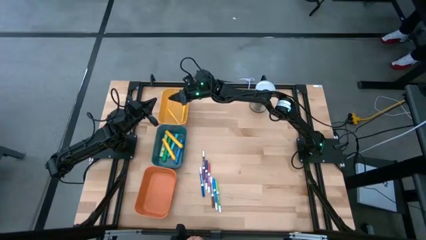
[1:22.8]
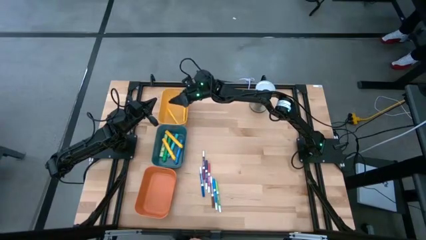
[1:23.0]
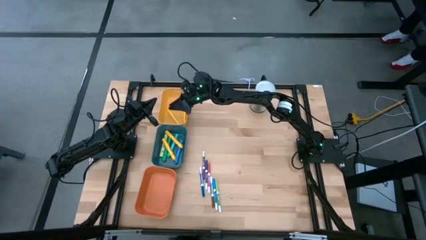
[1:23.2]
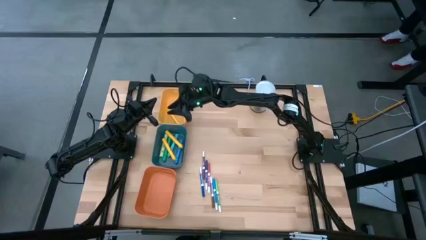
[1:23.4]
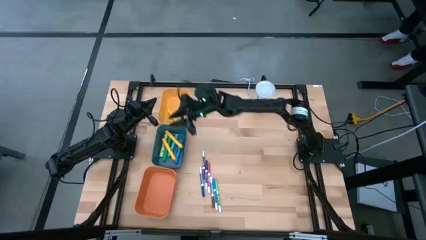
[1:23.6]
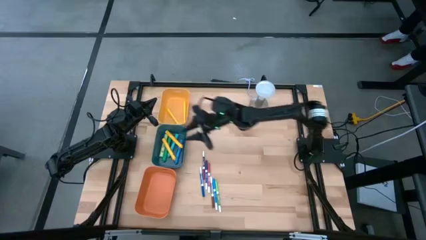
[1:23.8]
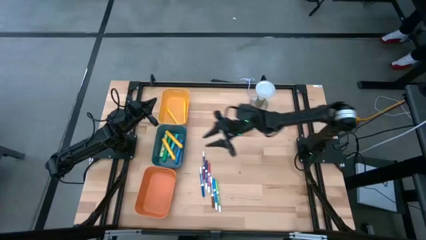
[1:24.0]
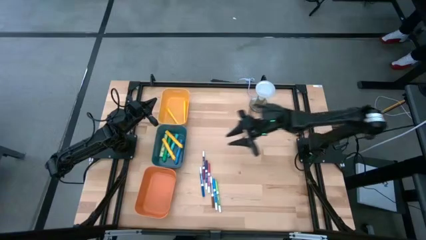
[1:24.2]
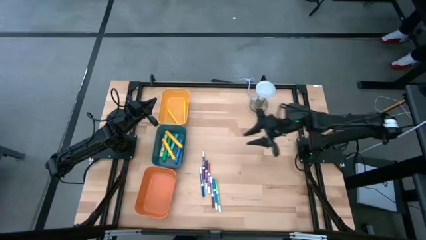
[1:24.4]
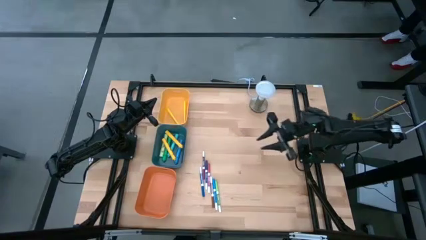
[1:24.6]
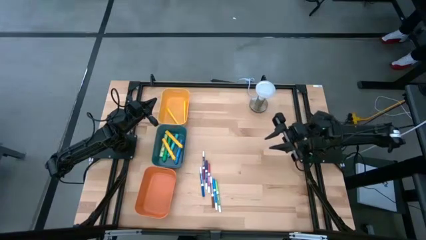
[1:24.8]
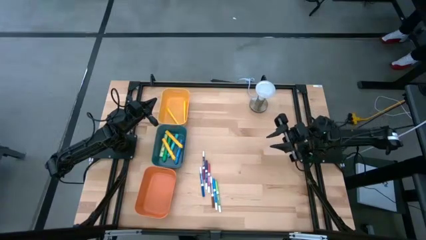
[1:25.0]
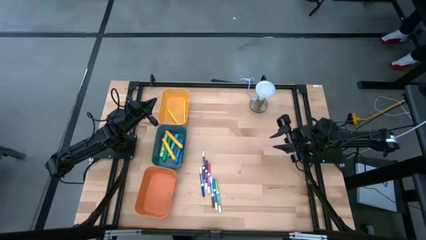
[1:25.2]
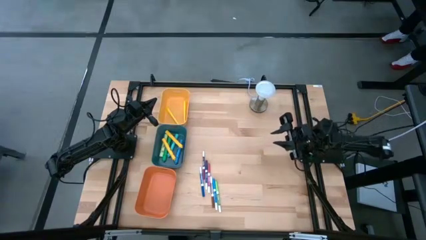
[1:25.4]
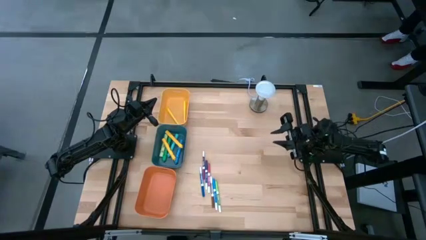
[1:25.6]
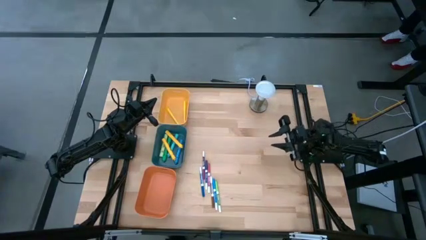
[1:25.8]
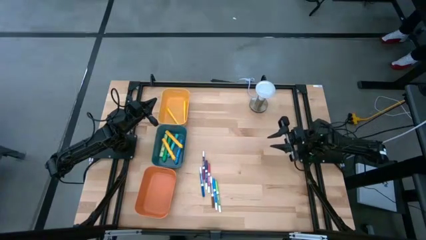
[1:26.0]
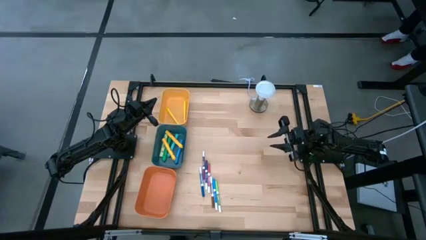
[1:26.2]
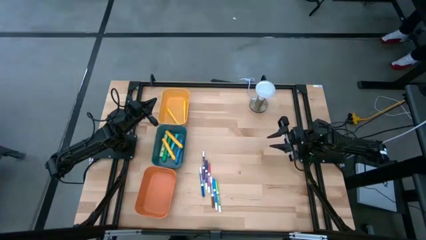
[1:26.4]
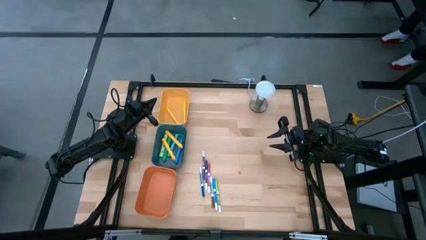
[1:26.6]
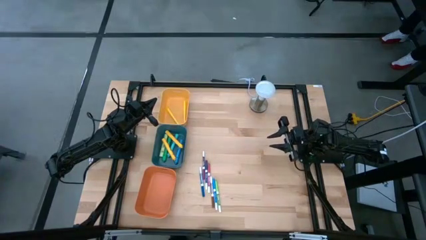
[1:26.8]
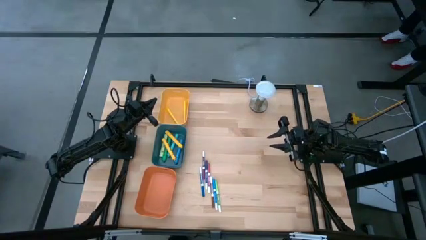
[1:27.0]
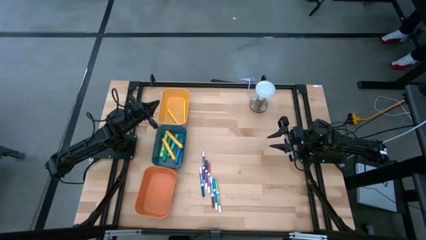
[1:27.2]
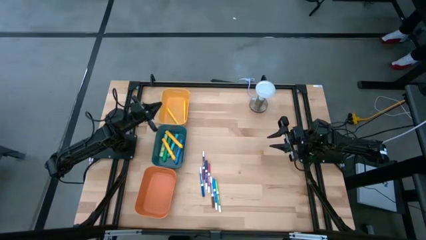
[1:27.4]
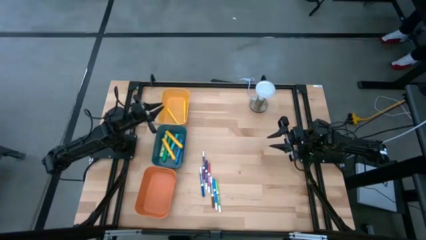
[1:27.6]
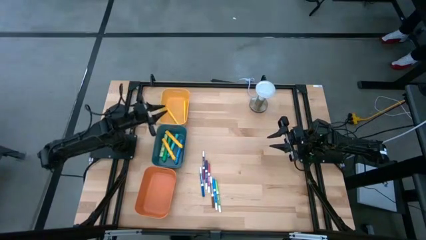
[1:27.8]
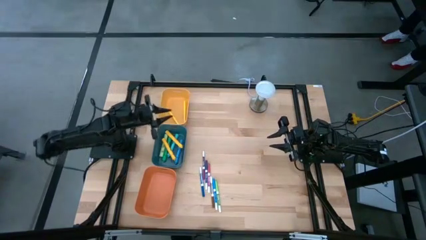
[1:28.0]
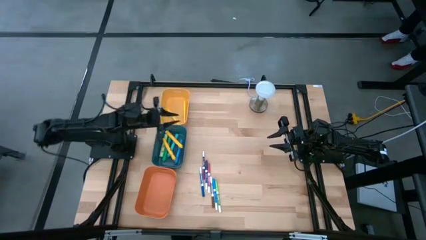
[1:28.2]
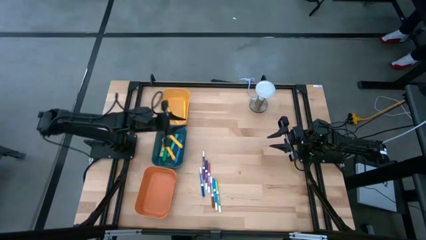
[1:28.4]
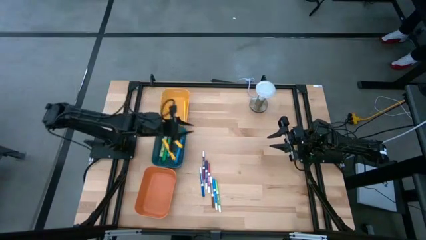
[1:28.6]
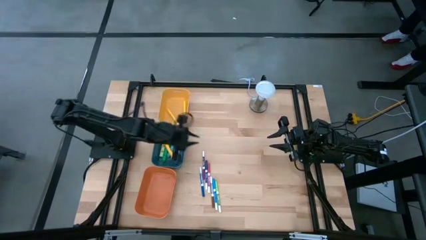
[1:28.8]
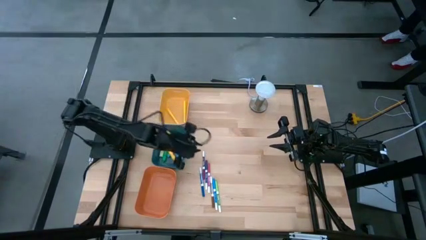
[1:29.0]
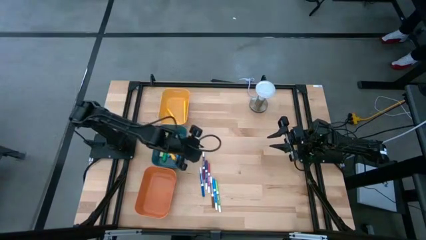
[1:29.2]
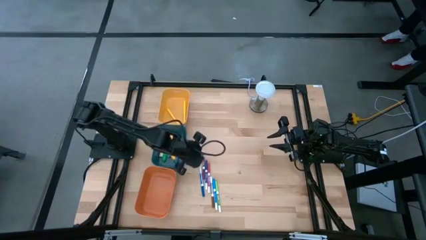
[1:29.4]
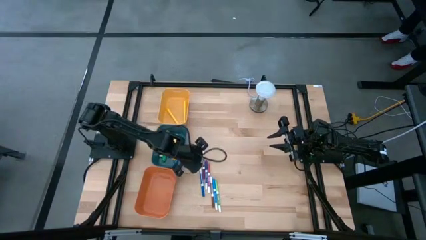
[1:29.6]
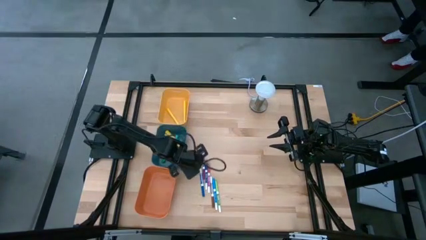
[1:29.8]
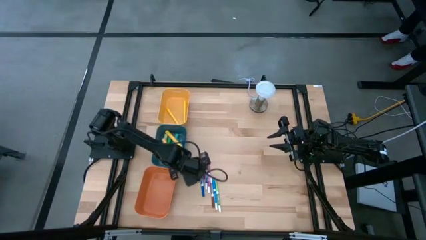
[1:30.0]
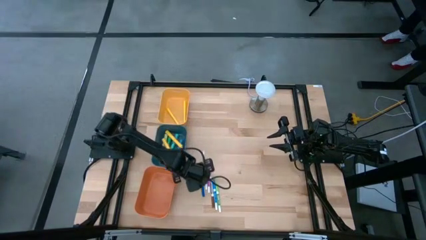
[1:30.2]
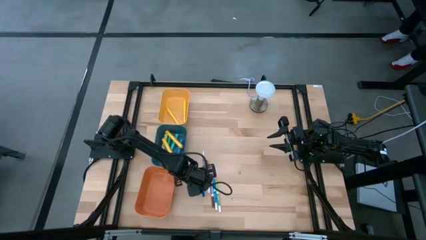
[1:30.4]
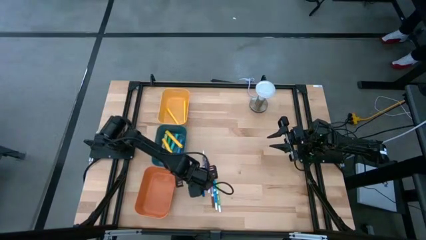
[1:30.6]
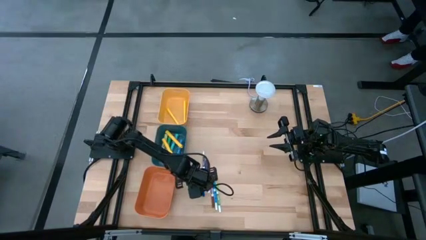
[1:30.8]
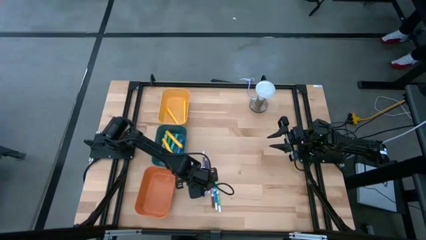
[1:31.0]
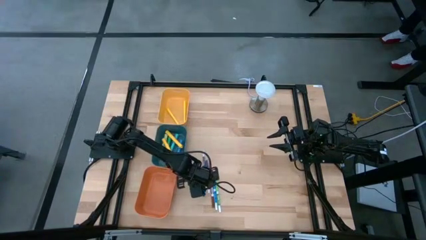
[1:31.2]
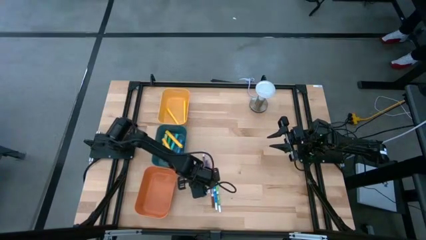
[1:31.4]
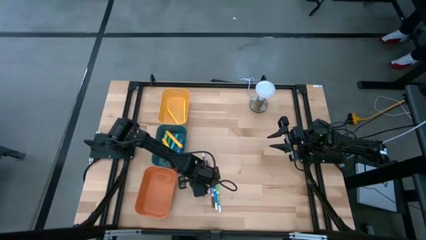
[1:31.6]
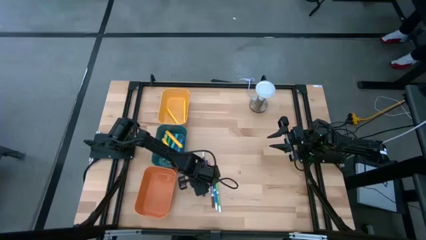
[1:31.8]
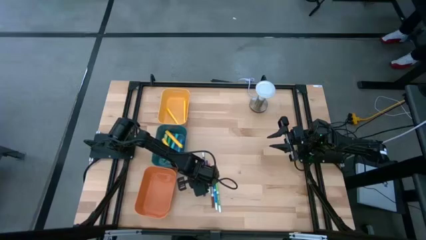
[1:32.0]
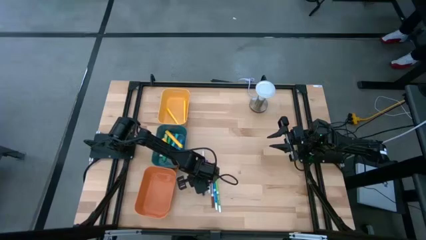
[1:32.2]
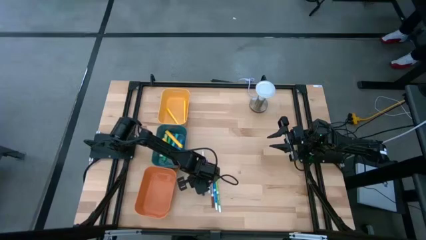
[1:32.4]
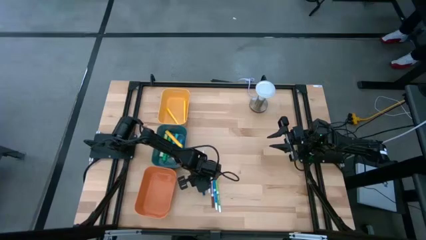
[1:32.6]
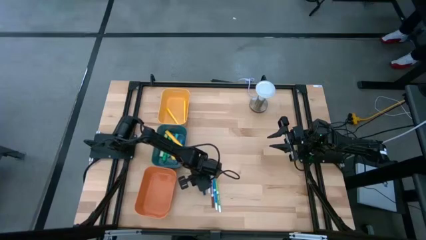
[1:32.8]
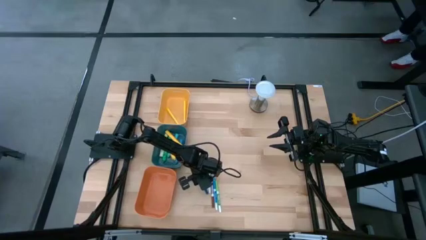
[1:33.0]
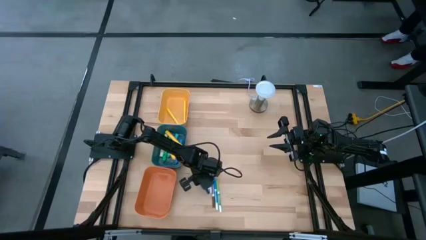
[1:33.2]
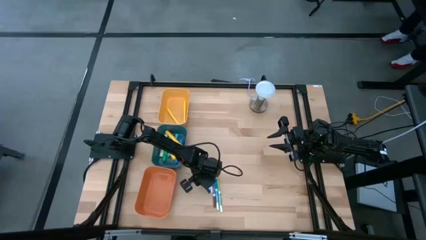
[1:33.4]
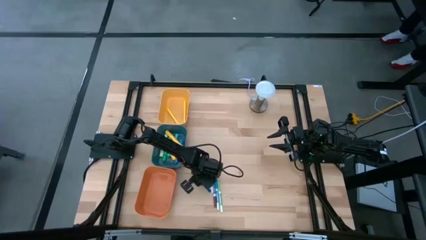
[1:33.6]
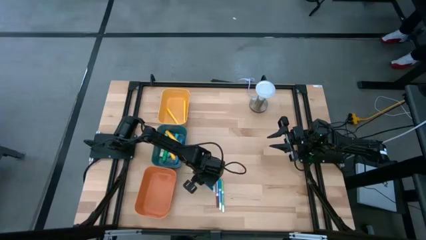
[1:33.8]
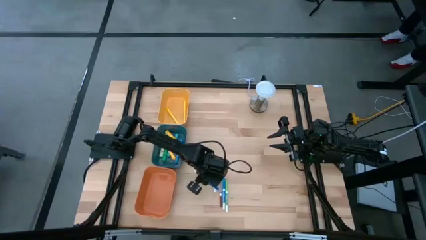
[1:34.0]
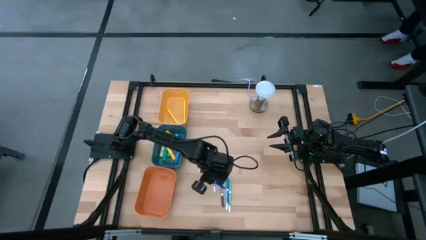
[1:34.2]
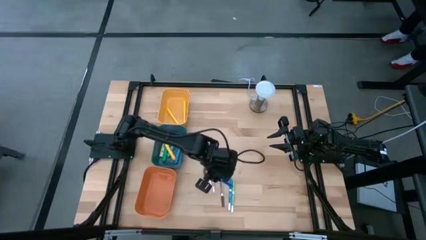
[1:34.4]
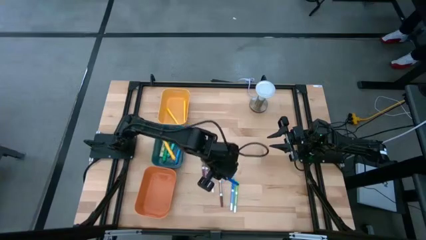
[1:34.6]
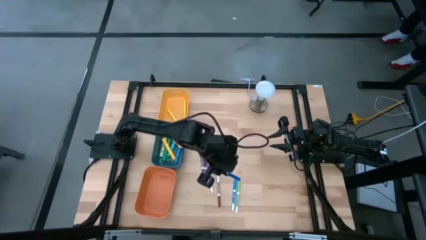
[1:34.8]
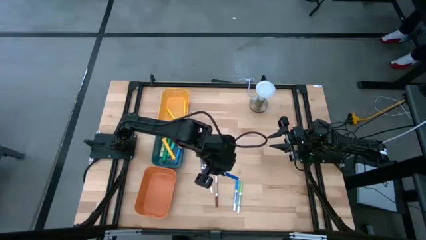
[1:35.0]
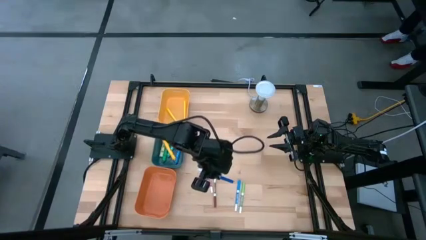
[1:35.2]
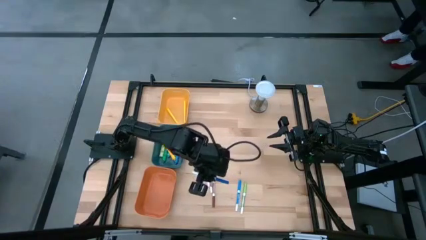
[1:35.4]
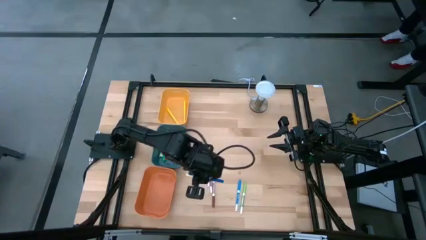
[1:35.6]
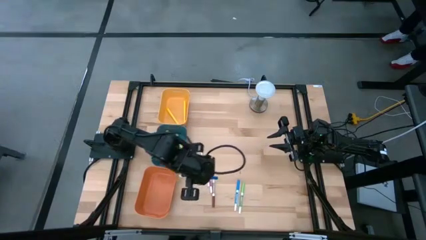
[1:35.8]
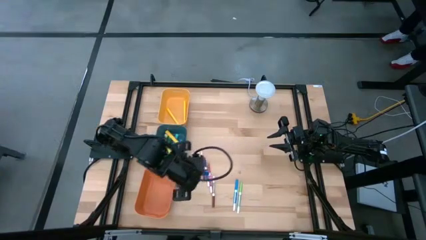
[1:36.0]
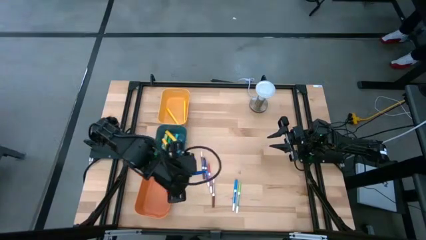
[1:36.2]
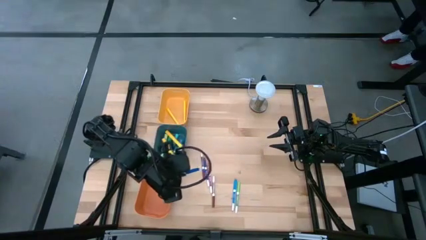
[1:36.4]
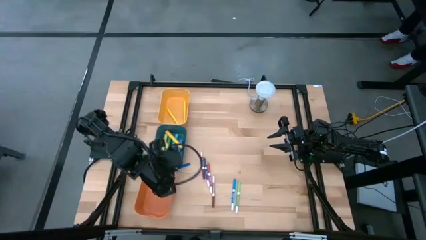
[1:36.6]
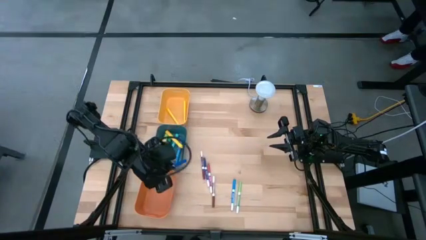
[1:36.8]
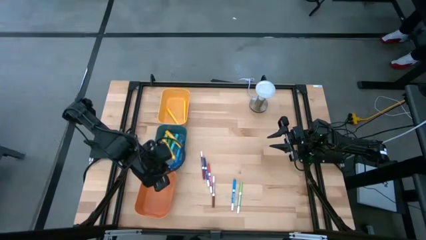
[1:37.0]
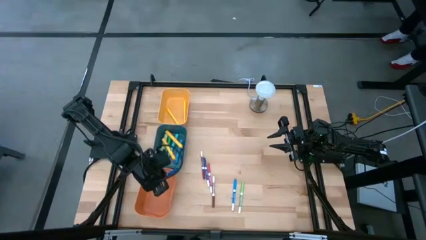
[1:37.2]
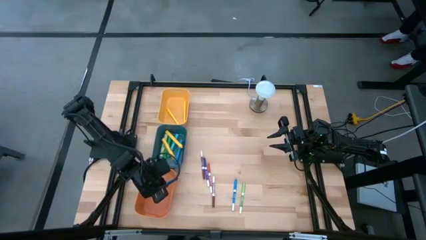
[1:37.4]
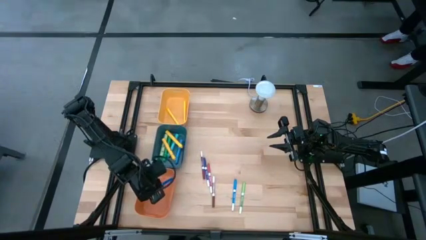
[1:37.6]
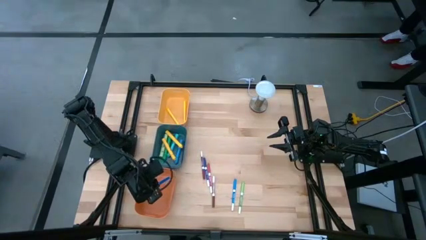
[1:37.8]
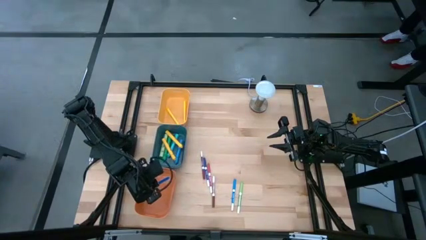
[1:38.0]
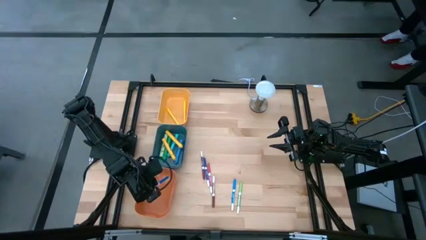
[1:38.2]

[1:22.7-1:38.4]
Task: Pick & Place Markers
Put the left blue marker pen into the orange bin
